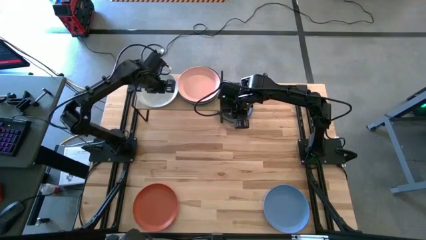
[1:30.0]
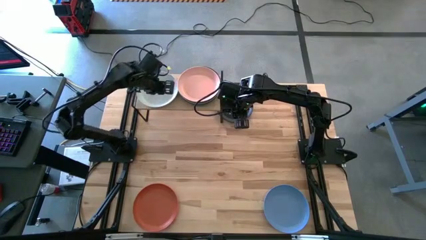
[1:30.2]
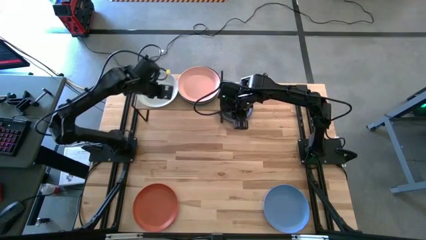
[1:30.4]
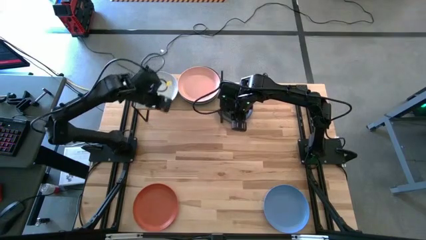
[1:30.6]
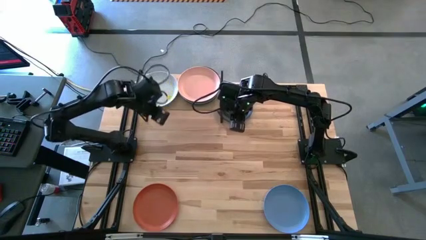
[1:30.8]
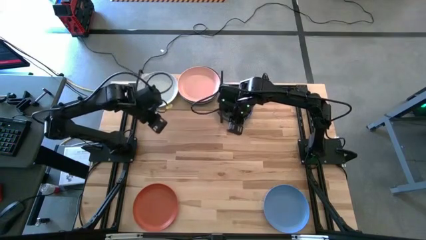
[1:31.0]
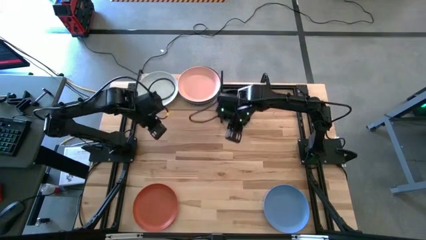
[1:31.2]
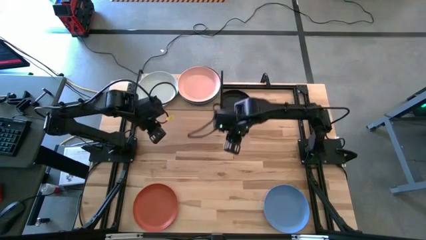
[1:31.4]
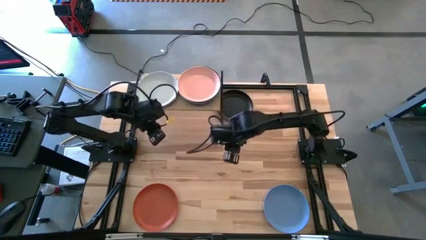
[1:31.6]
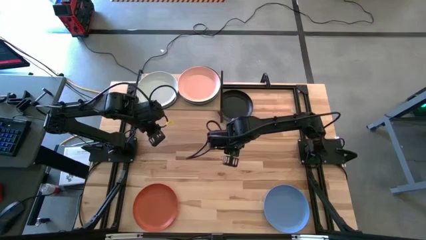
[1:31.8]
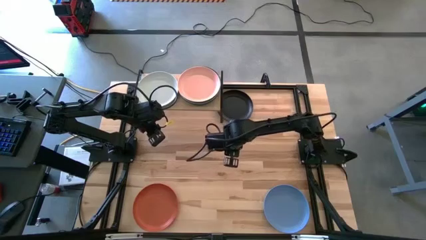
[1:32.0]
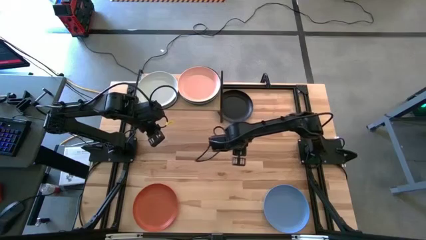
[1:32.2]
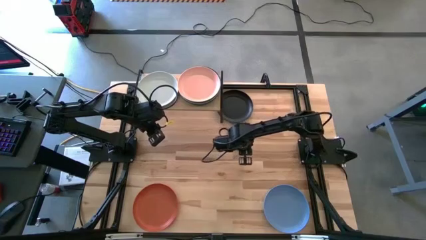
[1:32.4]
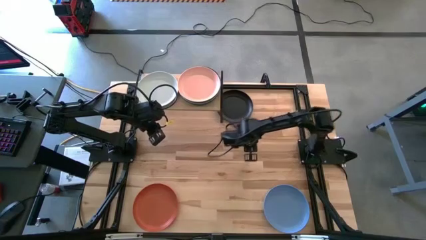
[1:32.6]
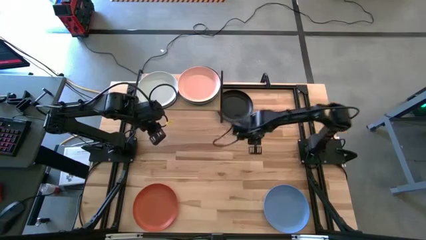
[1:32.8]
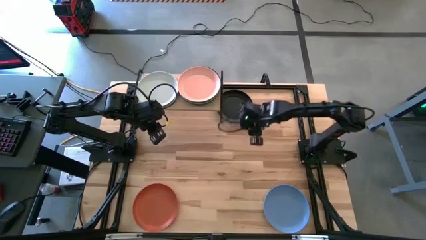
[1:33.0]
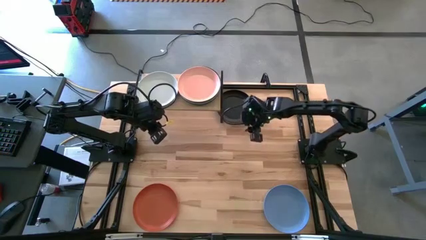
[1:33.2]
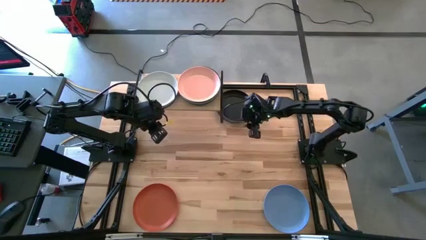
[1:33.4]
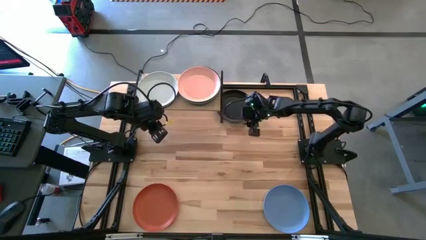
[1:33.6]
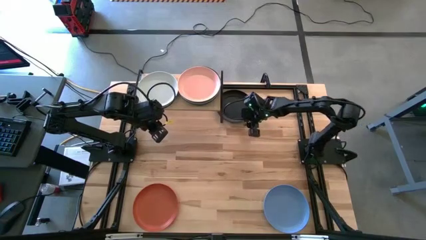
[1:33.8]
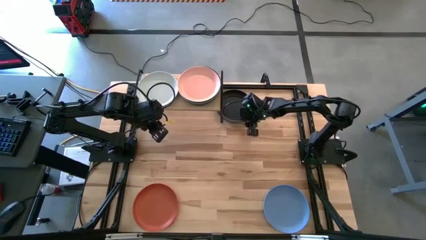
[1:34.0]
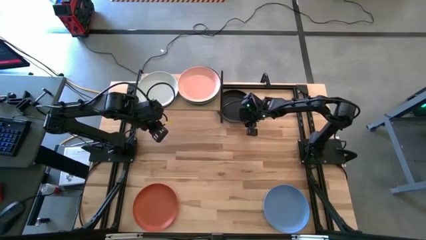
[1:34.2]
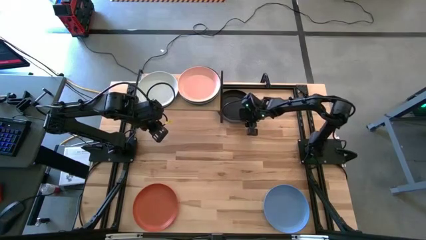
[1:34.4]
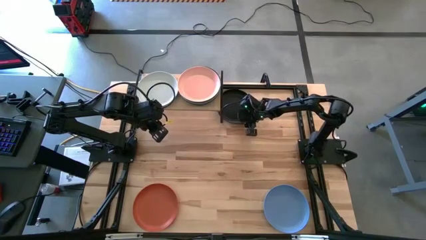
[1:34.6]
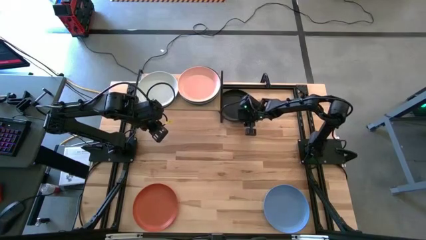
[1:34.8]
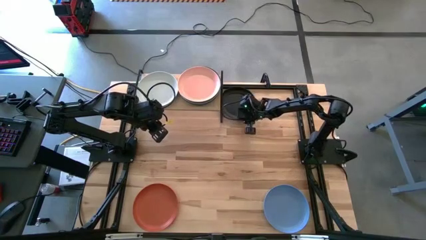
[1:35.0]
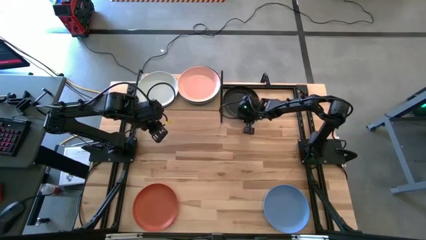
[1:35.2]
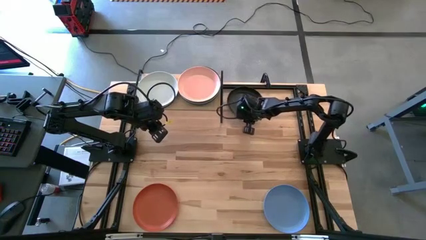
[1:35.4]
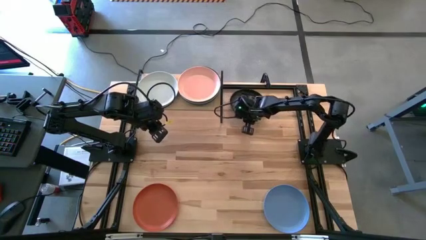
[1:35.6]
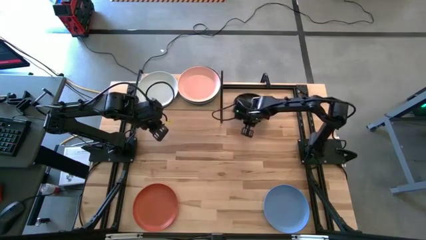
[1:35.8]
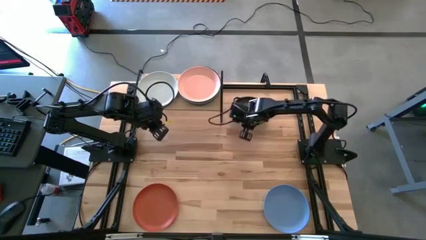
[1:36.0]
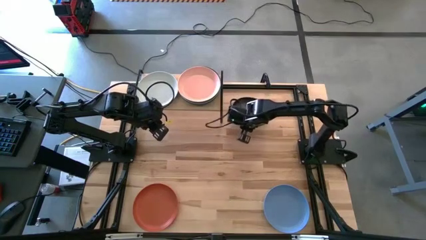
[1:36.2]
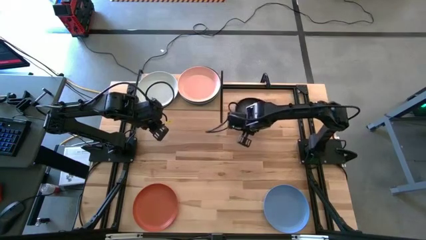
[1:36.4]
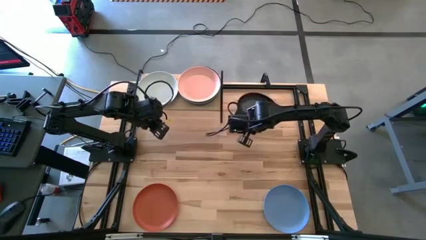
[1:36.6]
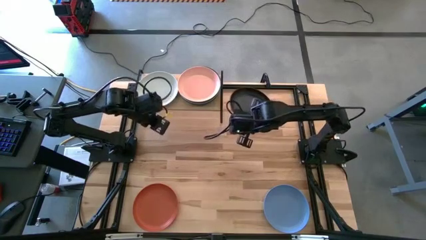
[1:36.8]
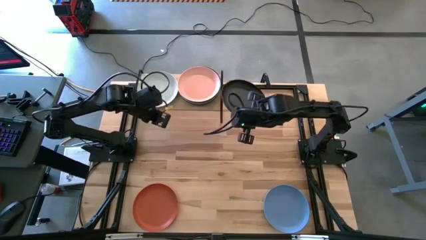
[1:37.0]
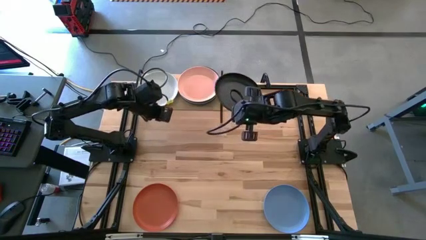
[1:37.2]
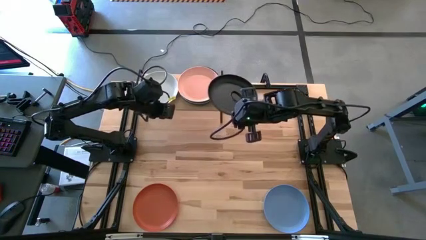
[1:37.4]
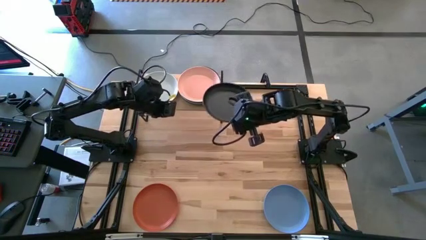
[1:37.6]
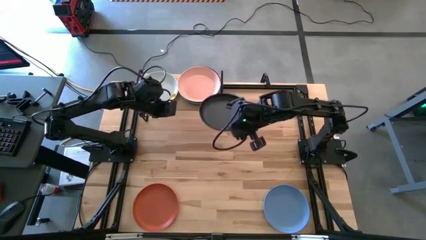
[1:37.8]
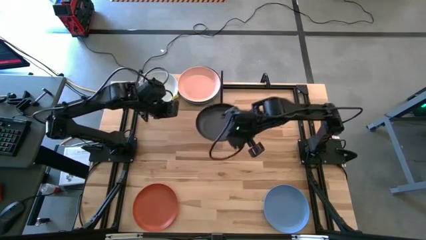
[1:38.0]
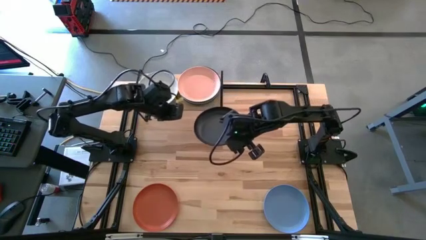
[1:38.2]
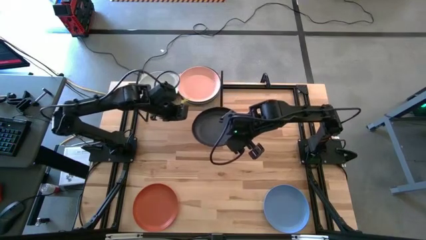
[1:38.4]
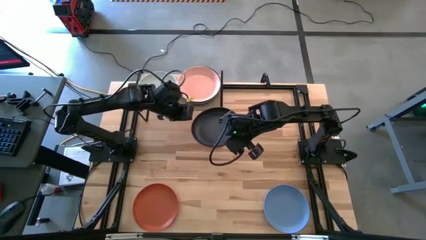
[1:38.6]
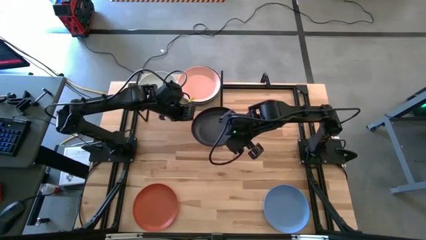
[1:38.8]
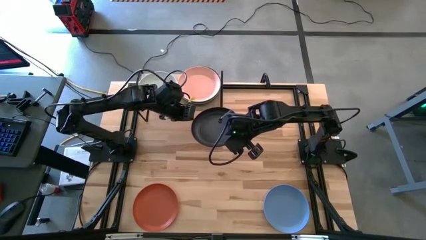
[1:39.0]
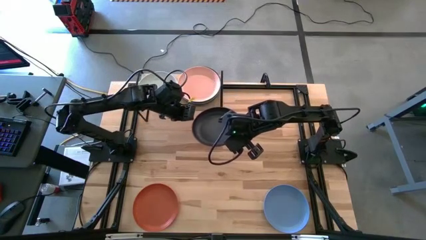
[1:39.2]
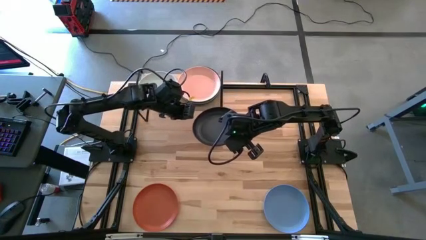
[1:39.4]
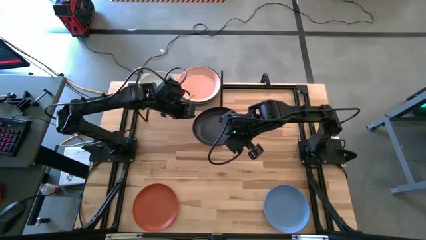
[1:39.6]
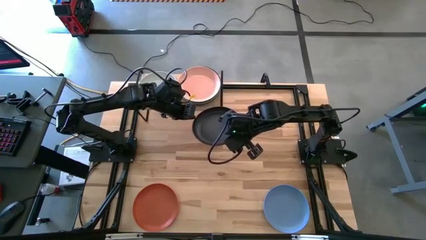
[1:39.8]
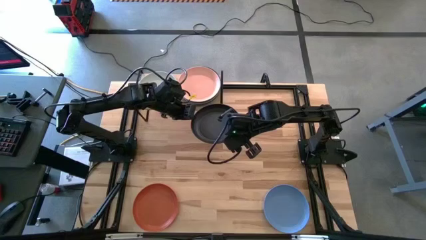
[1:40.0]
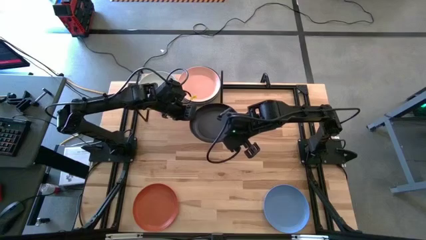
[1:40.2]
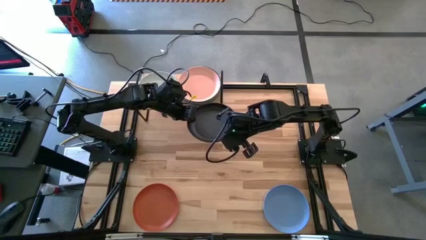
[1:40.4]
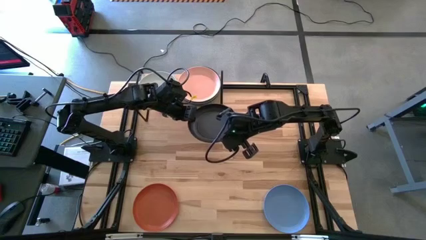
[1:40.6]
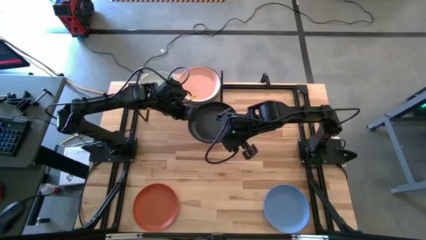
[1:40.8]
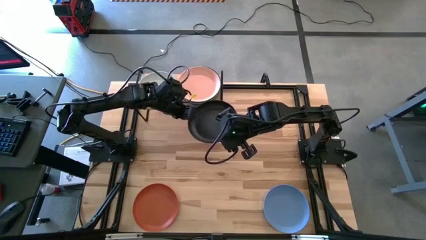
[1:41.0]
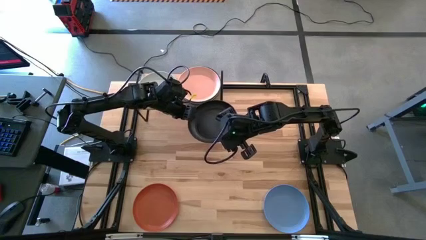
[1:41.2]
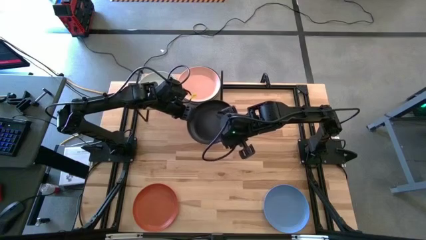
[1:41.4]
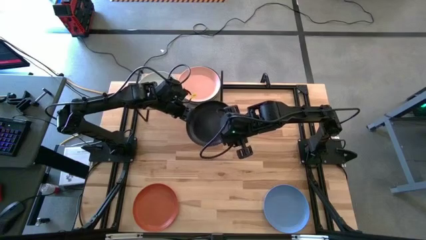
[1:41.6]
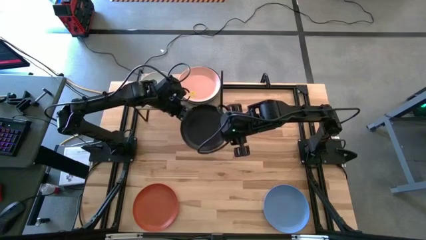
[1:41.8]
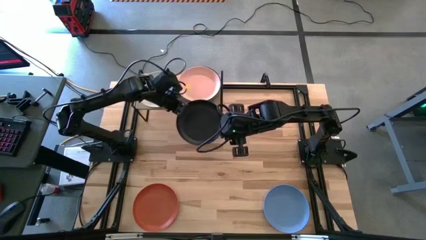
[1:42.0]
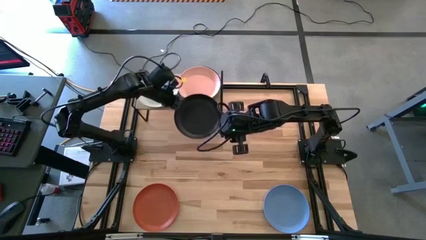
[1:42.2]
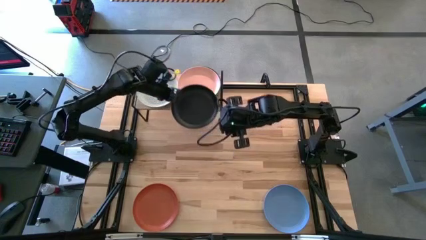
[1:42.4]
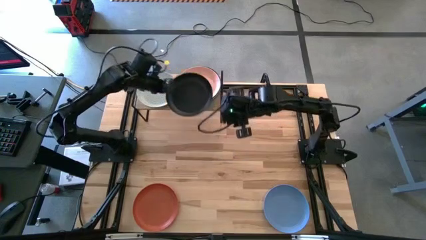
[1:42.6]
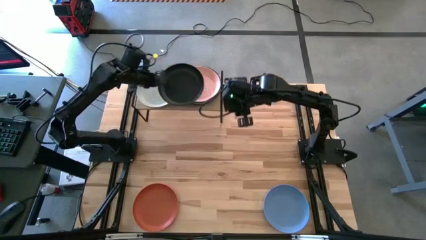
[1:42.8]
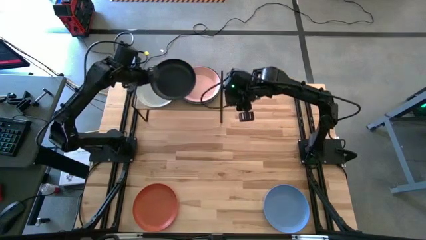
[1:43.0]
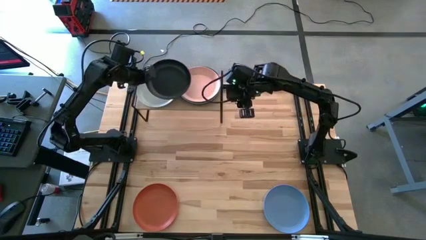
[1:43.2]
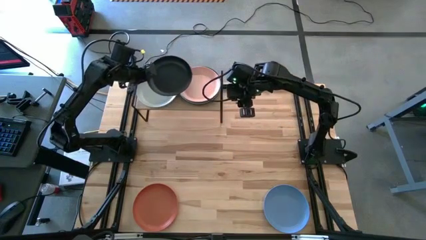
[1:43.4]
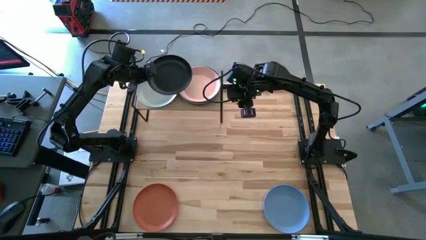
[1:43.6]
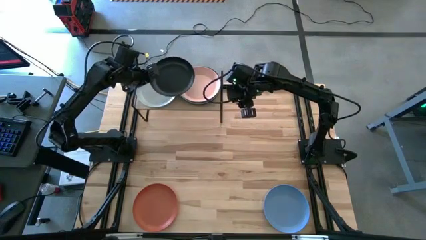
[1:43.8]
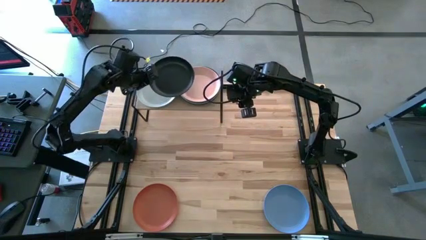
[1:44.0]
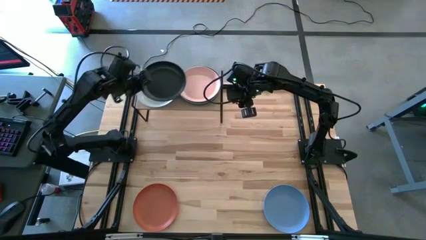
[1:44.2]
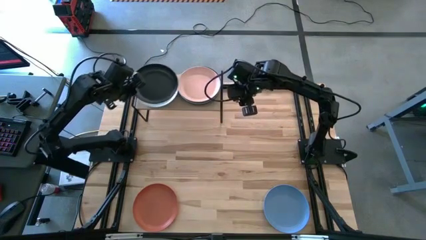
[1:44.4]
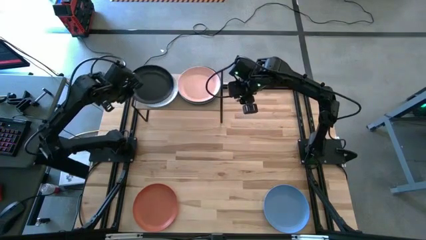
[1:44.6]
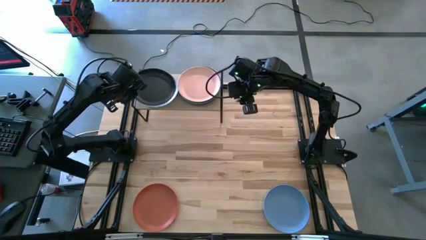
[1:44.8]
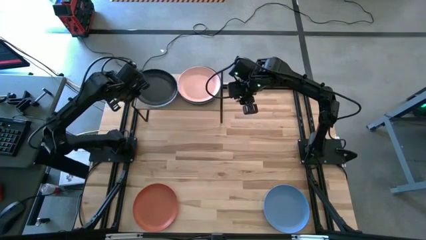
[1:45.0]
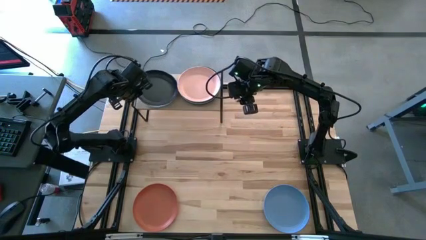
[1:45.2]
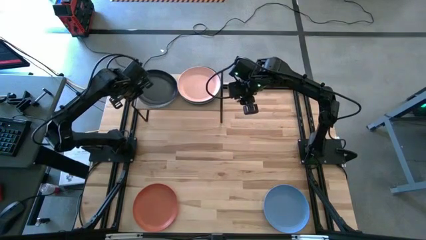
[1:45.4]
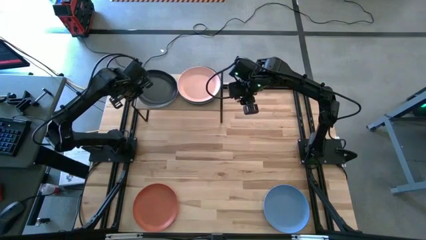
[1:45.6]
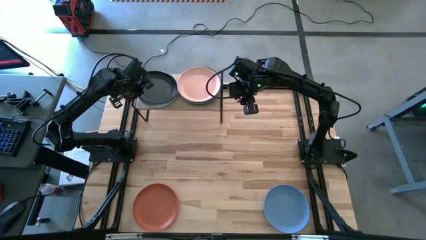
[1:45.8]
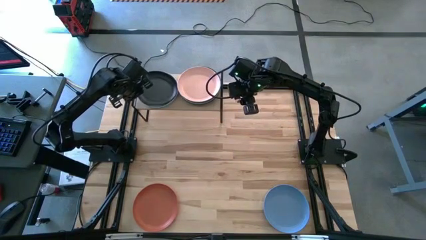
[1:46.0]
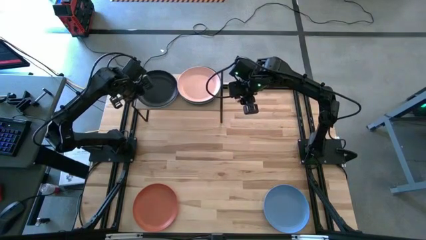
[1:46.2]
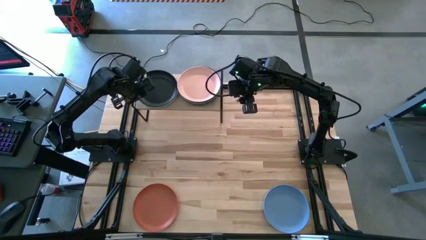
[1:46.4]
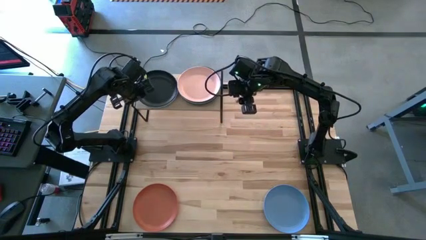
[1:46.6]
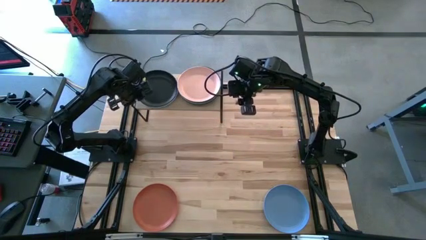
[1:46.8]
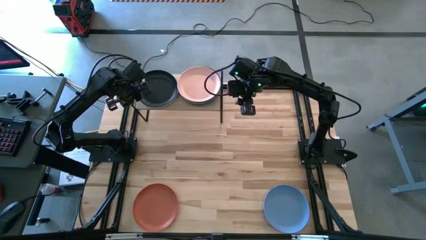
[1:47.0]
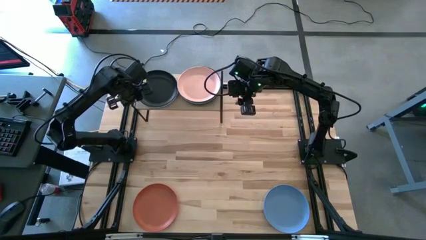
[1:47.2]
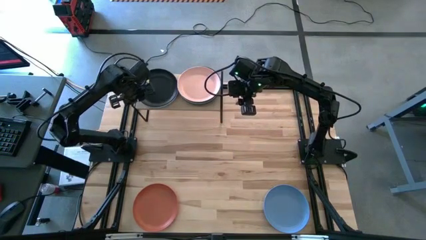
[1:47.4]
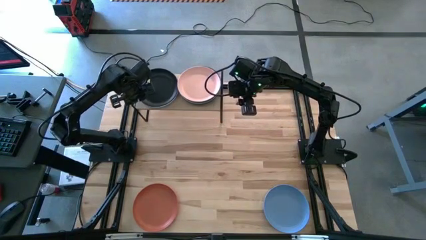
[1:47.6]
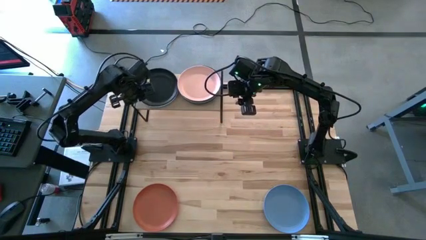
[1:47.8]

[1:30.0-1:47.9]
Task: Place and stack plates onto a shelf
Stack the black plate on top of the white plate on the shelf
